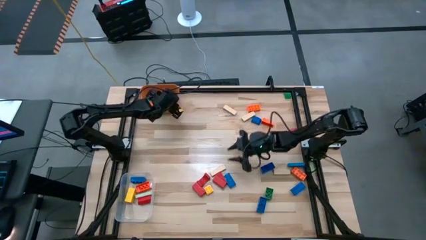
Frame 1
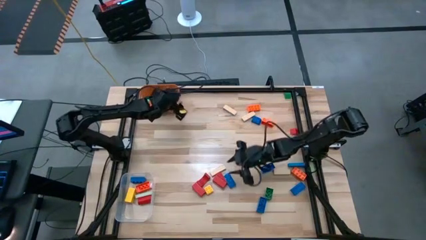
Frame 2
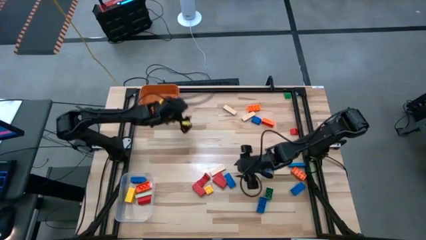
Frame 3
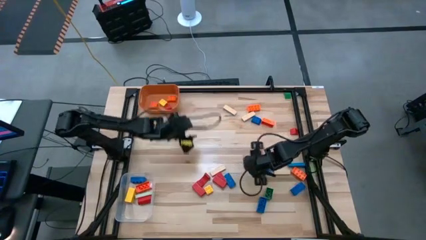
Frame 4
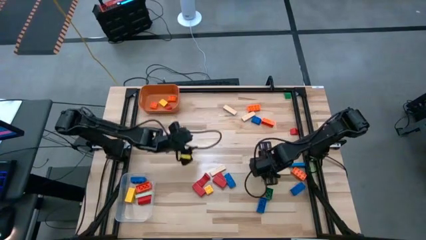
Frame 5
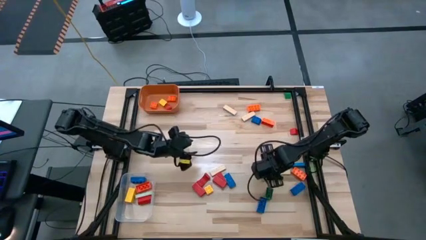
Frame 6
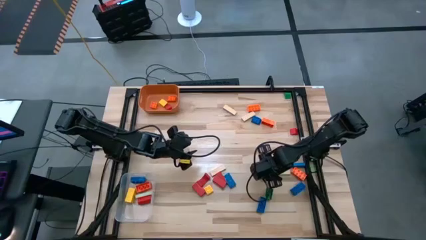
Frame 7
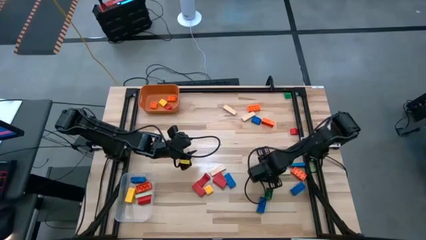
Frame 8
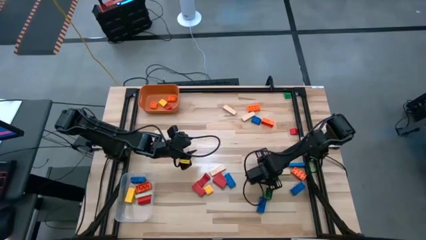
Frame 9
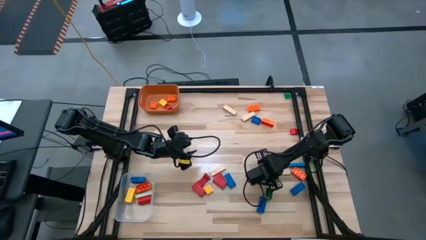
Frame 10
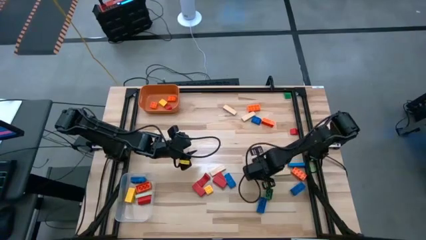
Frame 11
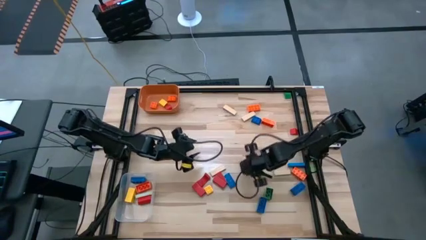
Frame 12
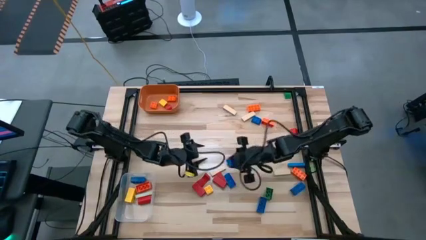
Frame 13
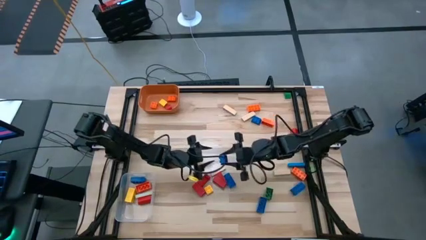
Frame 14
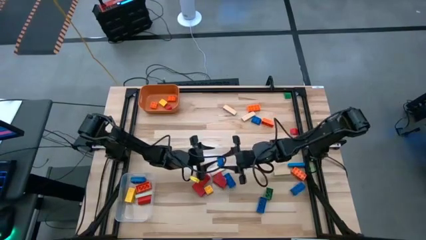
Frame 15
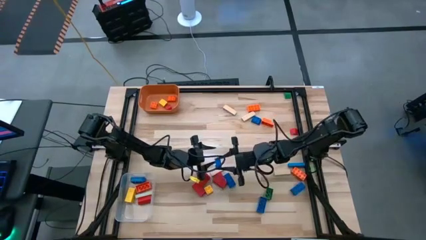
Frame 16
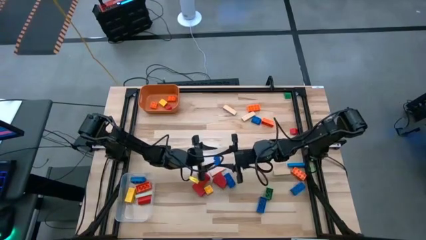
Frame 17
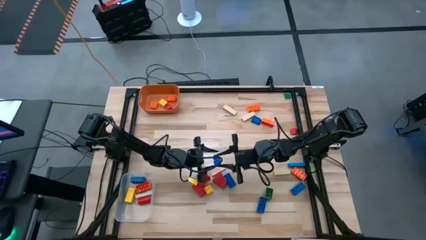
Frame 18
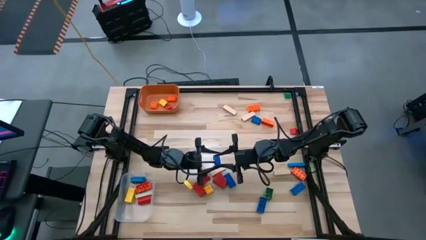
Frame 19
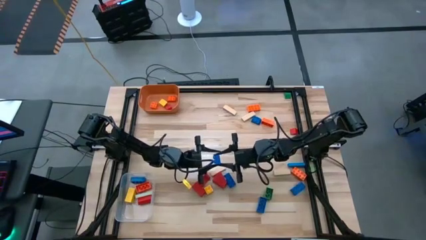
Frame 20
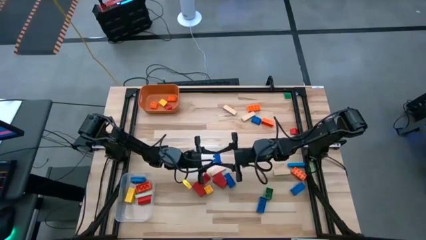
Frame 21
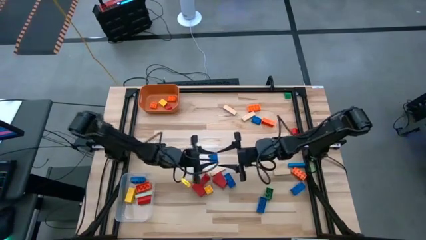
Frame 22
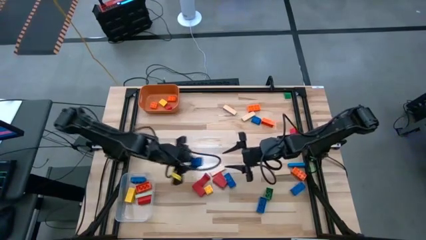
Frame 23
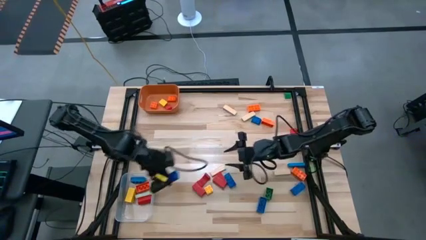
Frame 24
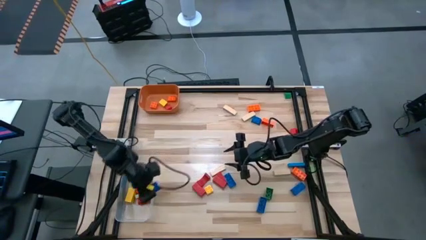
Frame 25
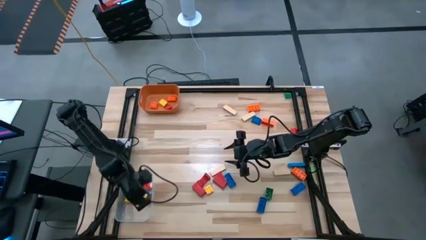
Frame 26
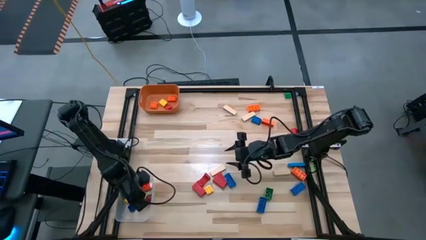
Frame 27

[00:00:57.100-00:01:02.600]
Task: Sort blocks by size
Put the large blue game piece into the transparent bin

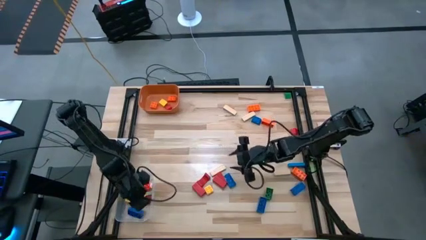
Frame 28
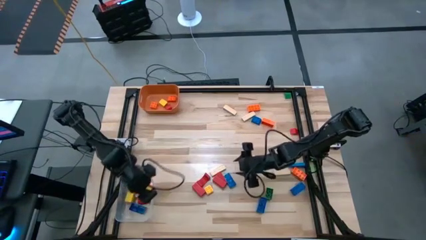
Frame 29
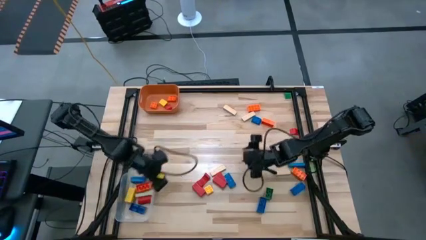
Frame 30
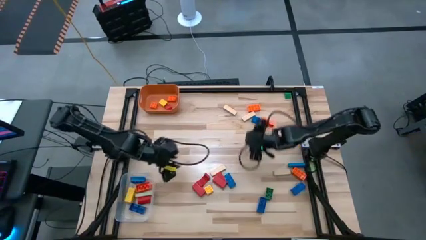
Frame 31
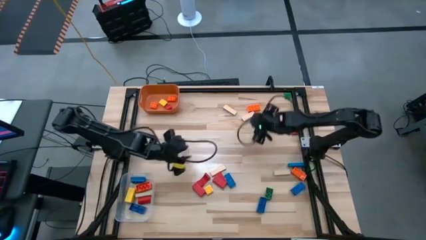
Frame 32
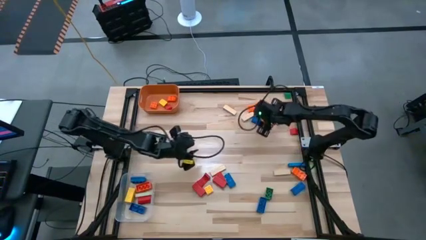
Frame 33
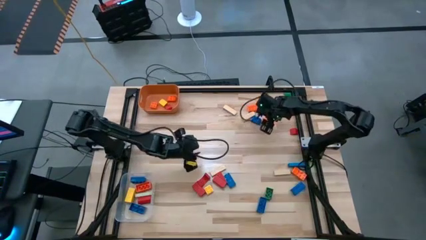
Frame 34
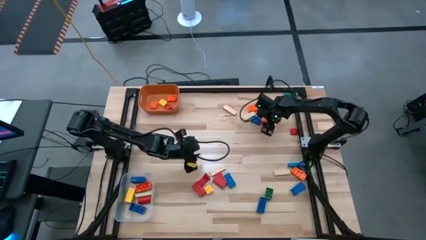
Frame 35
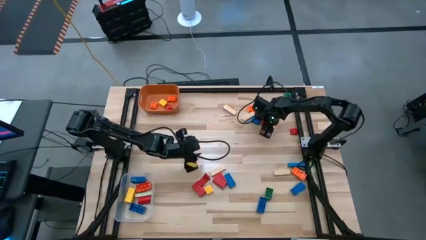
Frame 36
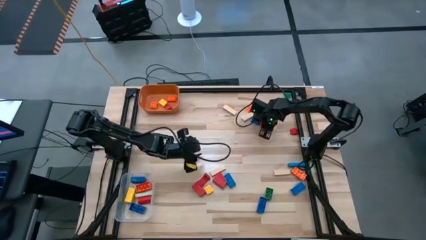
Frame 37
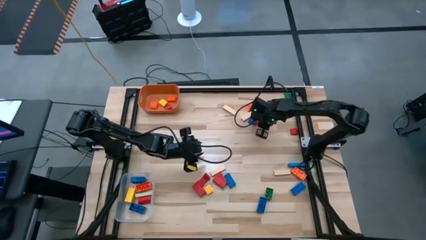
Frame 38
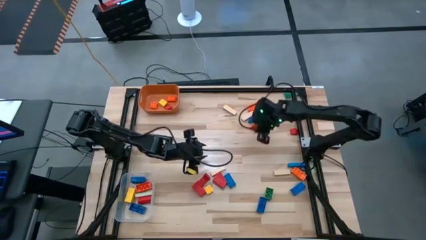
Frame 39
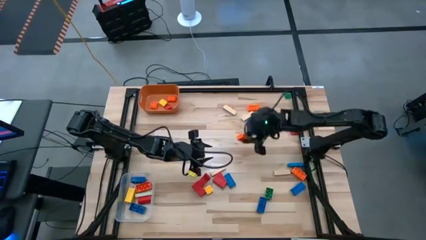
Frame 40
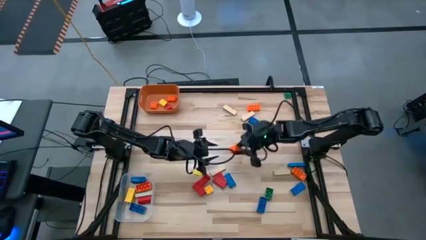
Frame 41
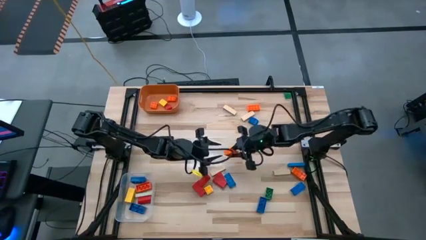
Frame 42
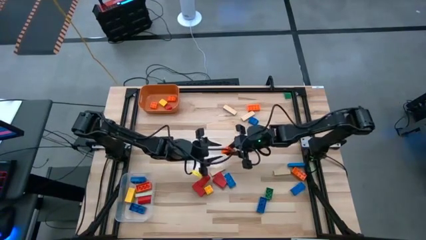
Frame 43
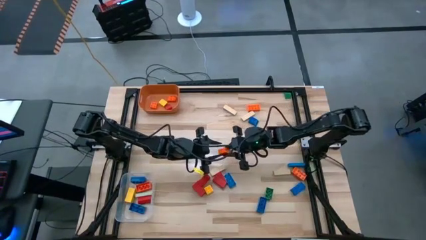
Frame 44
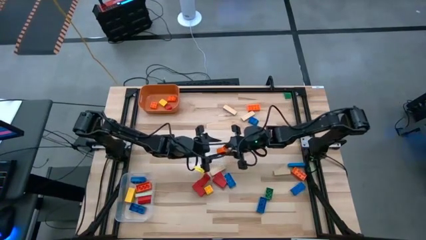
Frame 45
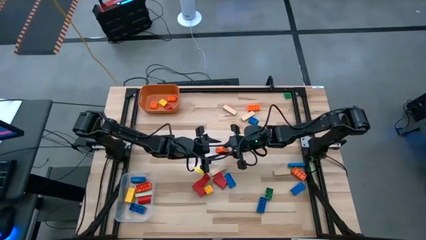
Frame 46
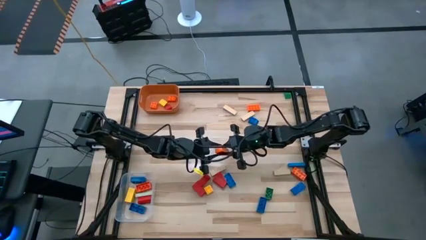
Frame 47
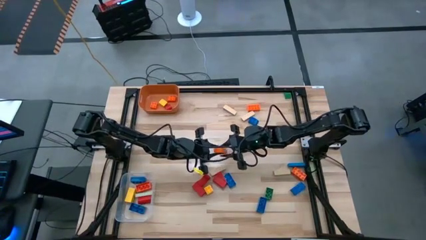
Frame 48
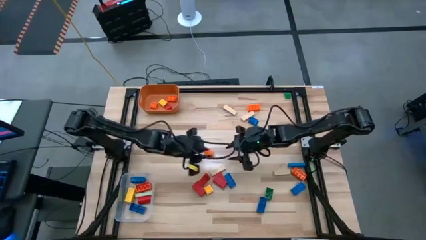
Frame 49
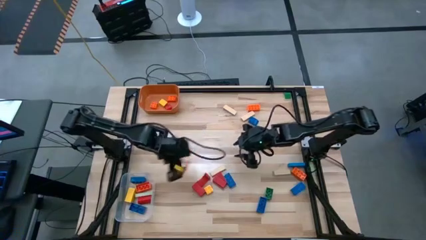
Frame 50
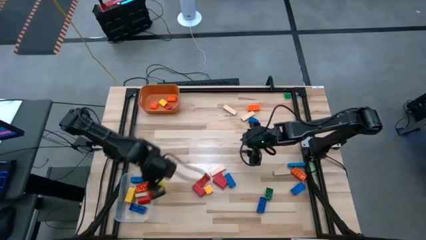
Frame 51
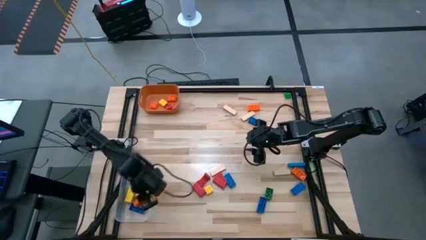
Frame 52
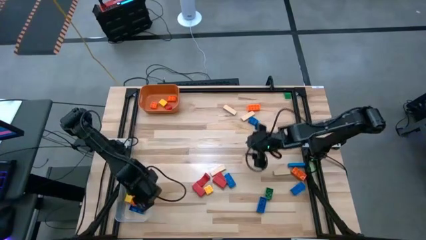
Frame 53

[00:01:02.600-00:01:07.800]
Put the large orange game piece into the transparent bin

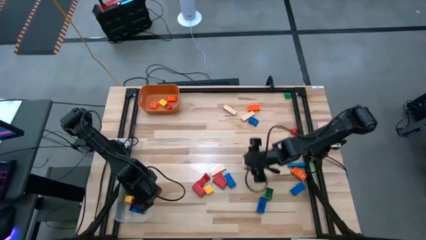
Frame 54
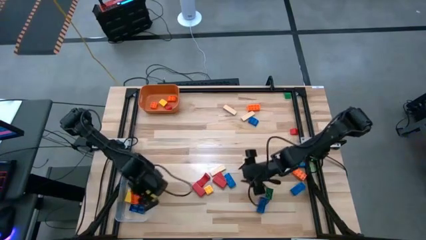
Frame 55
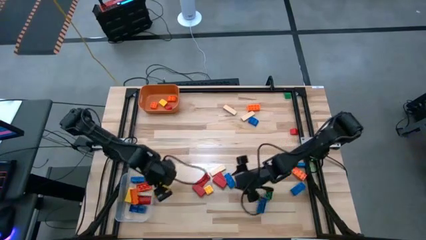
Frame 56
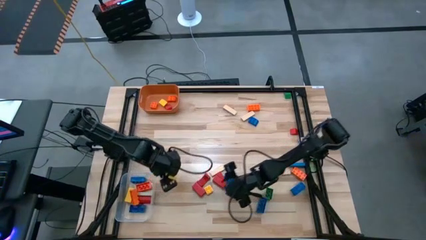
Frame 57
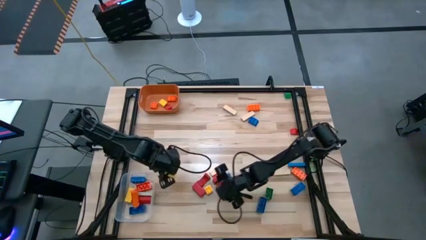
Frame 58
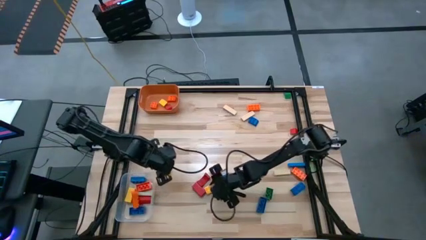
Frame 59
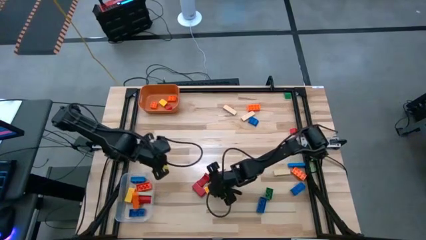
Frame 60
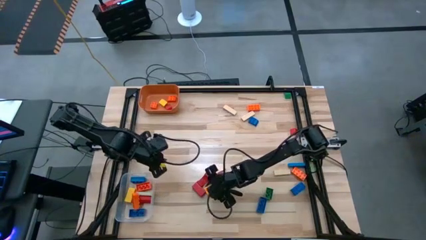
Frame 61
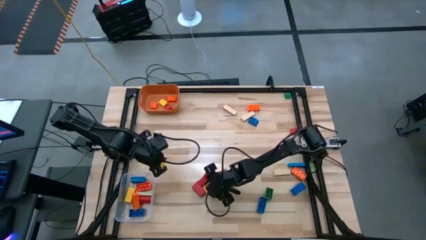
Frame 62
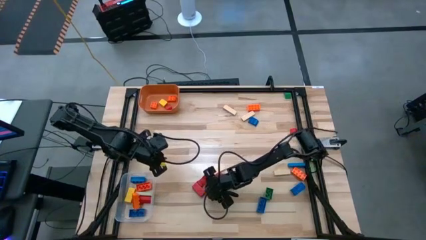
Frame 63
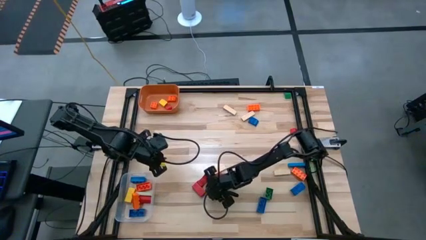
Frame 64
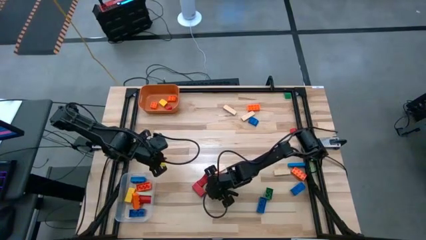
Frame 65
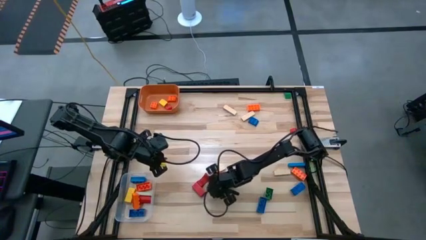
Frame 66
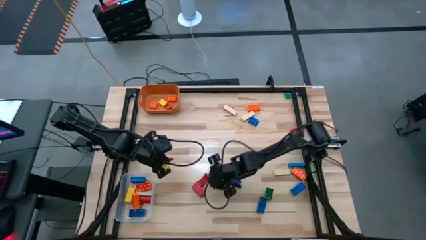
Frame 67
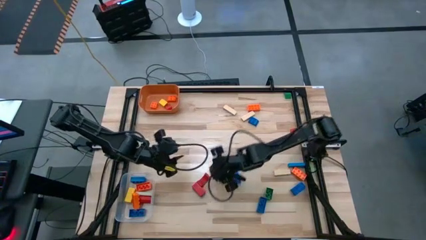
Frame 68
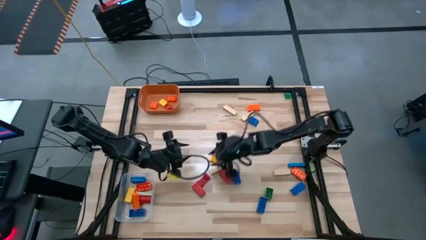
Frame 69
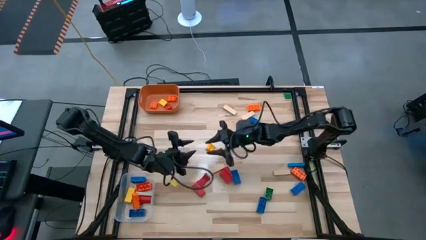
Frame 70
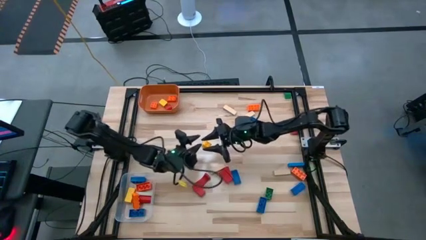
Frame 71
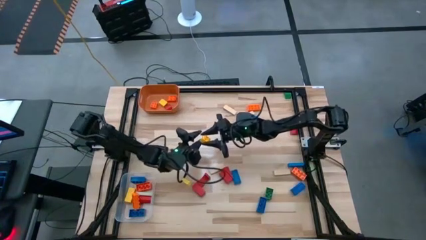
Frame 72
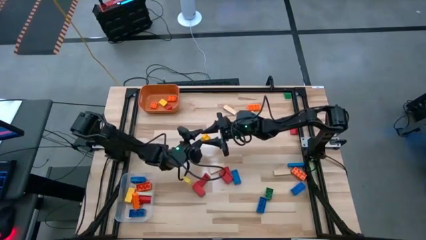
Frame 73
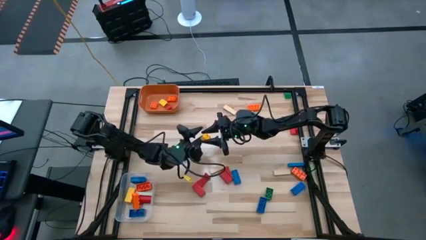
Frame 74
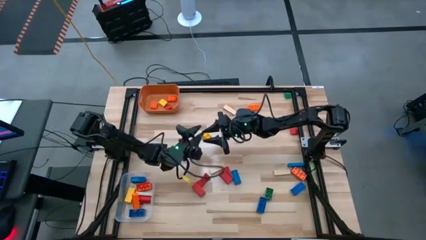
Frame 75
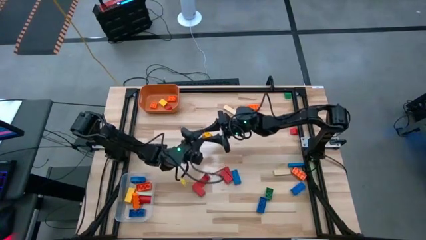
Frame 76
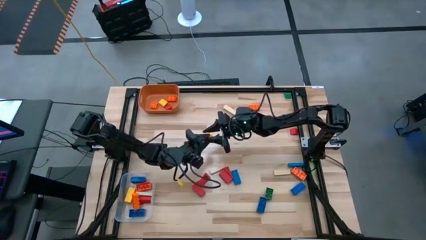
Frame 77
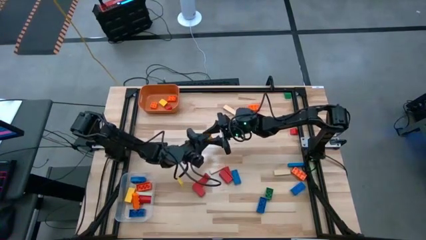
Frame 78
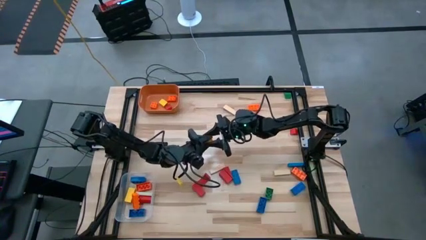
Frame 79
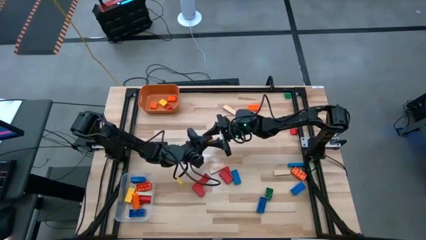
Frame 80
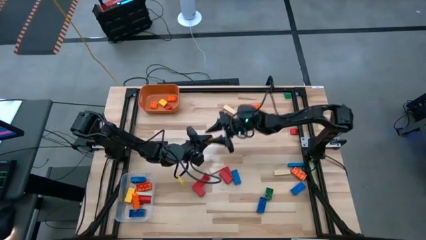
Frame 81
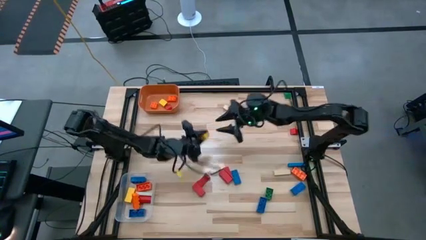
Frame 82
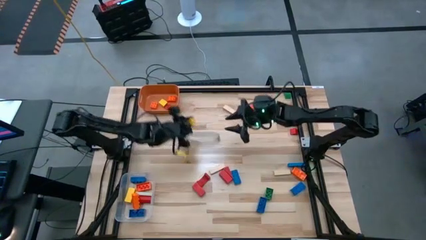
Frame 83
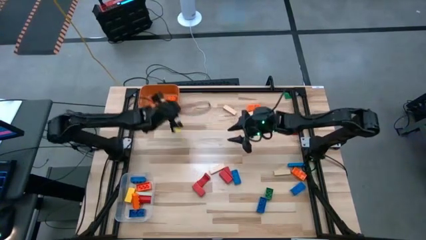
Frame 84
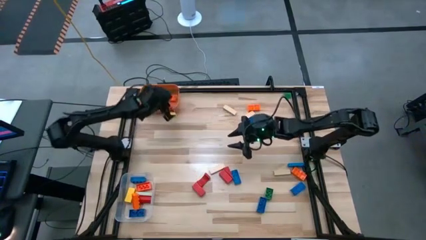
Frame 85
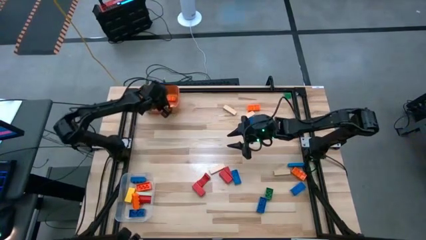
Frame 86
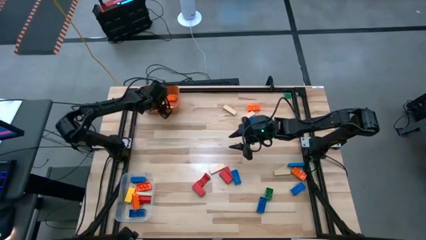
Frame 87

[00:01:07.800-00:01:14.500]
Put the small yellow game piece into the orange bin
